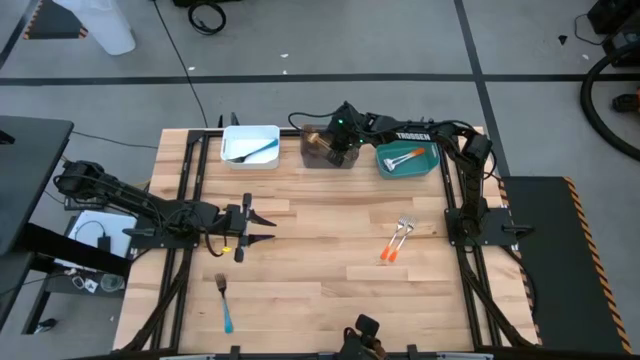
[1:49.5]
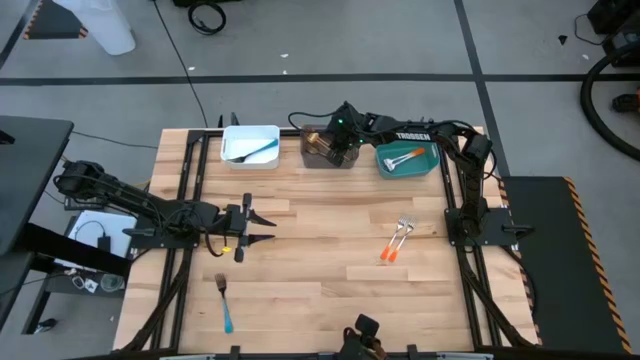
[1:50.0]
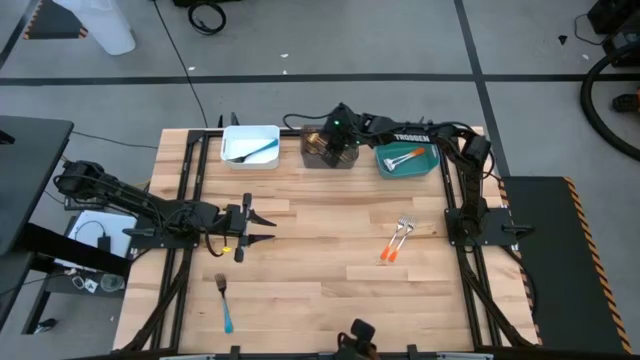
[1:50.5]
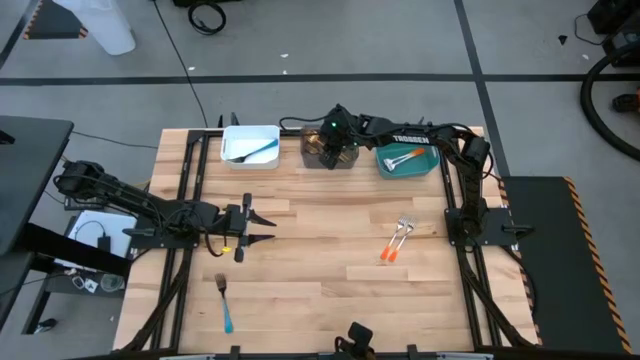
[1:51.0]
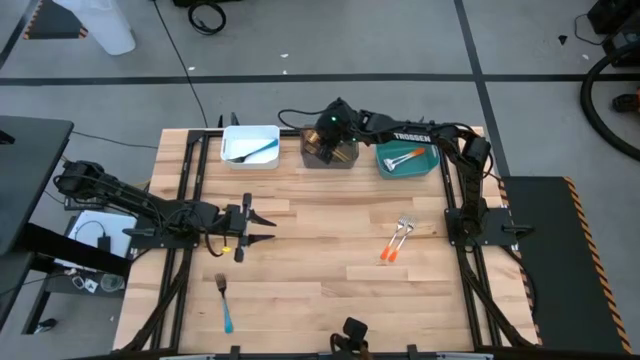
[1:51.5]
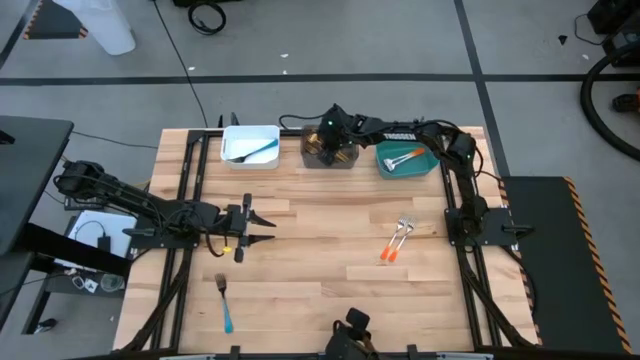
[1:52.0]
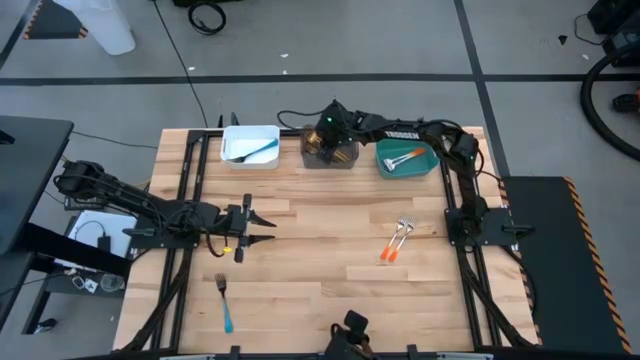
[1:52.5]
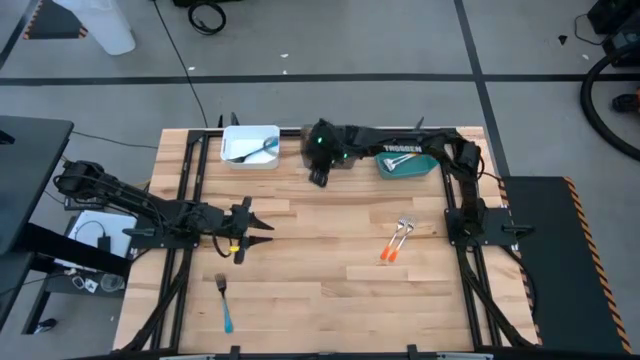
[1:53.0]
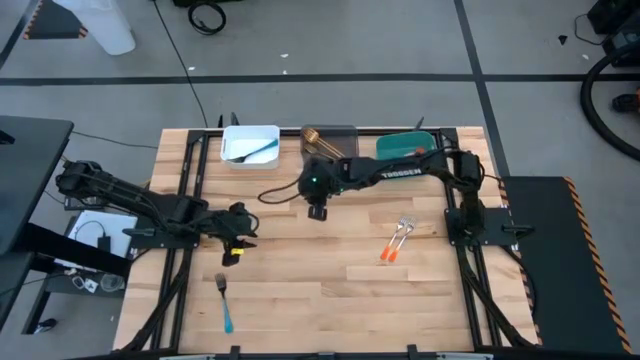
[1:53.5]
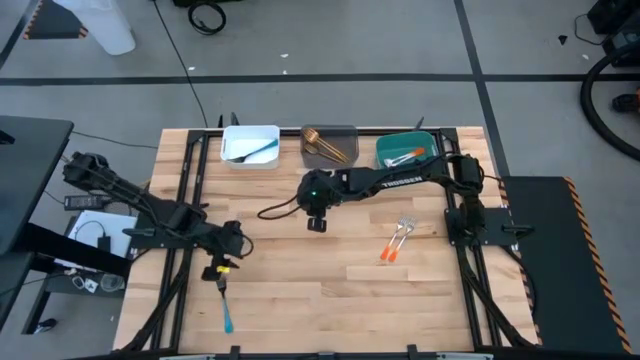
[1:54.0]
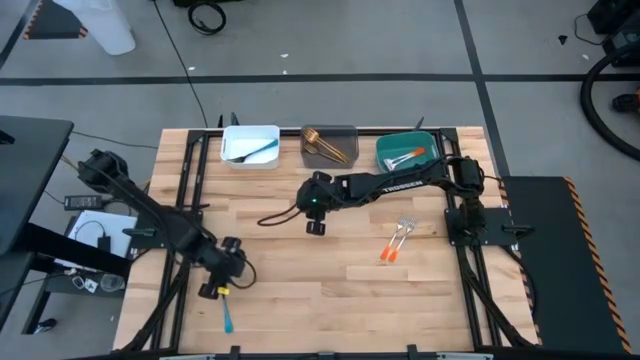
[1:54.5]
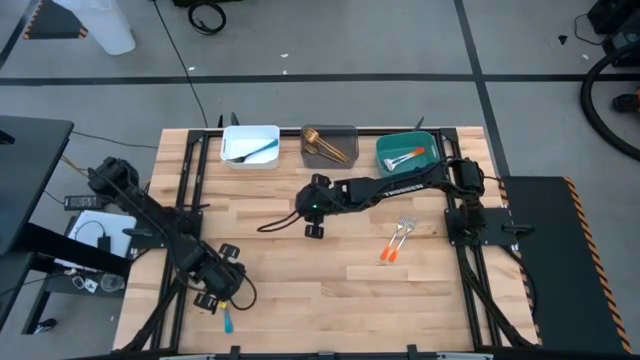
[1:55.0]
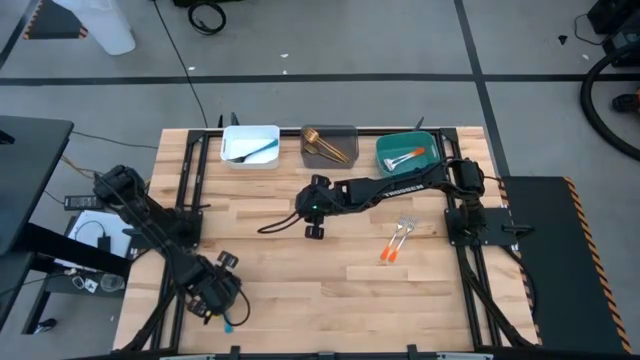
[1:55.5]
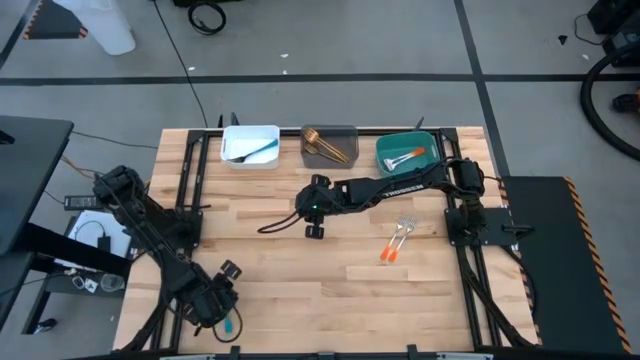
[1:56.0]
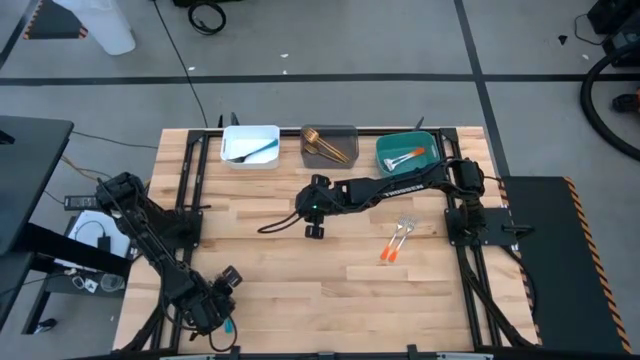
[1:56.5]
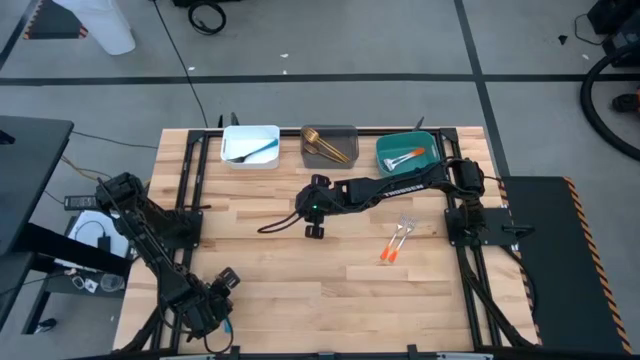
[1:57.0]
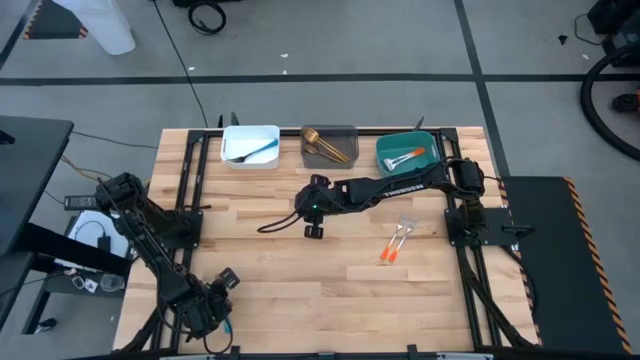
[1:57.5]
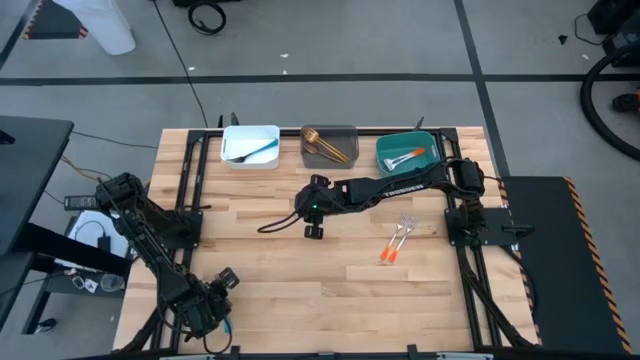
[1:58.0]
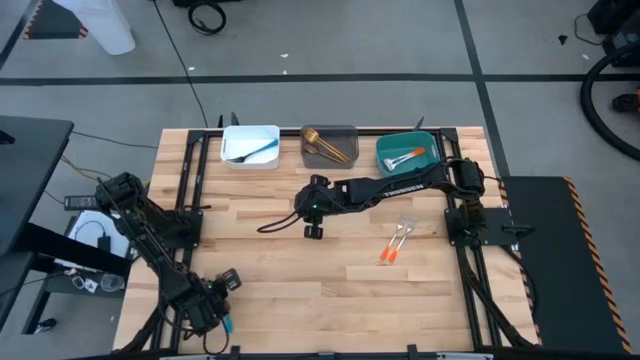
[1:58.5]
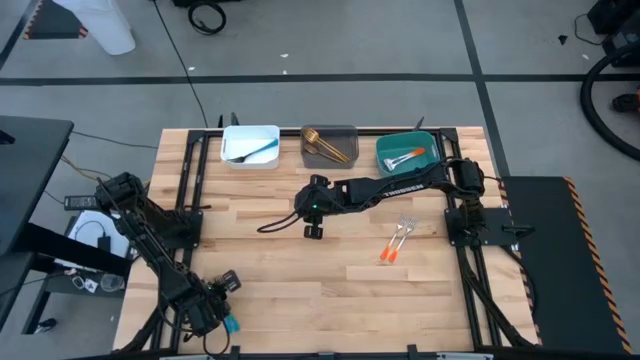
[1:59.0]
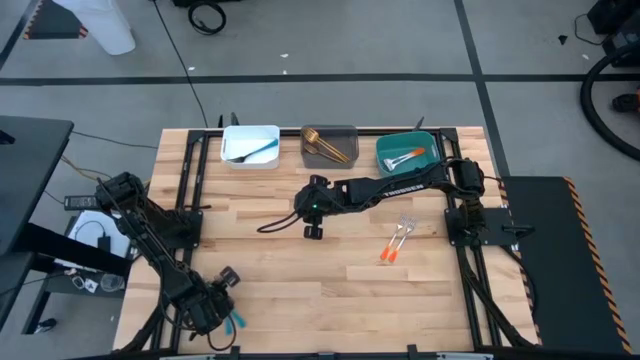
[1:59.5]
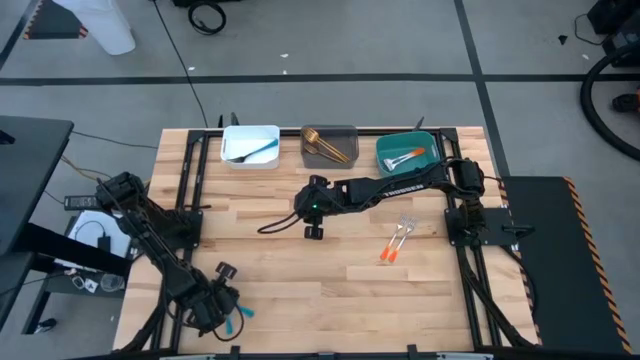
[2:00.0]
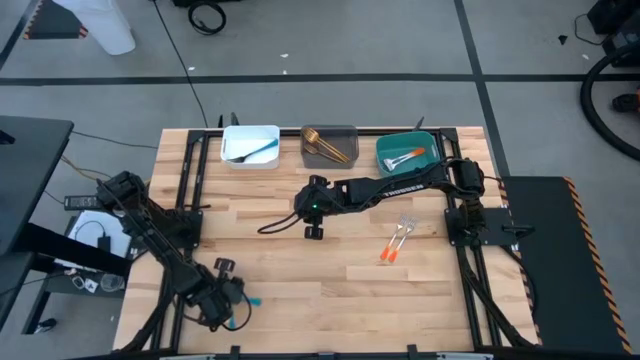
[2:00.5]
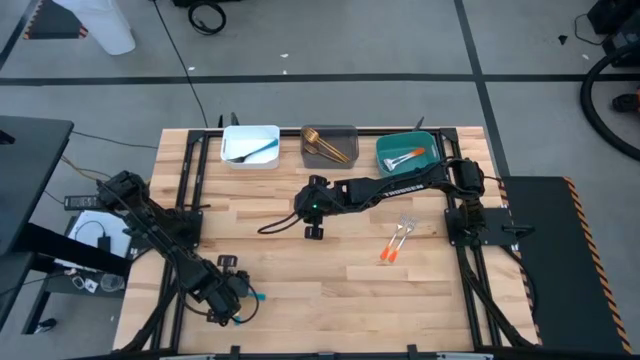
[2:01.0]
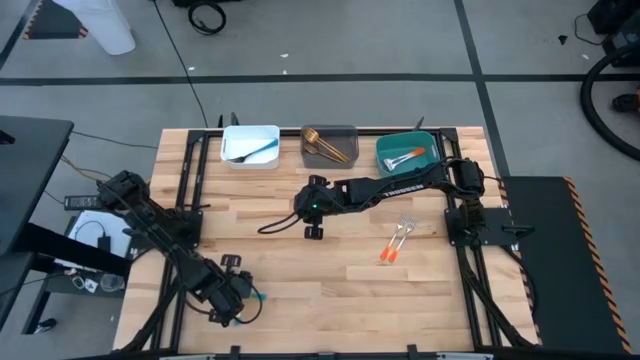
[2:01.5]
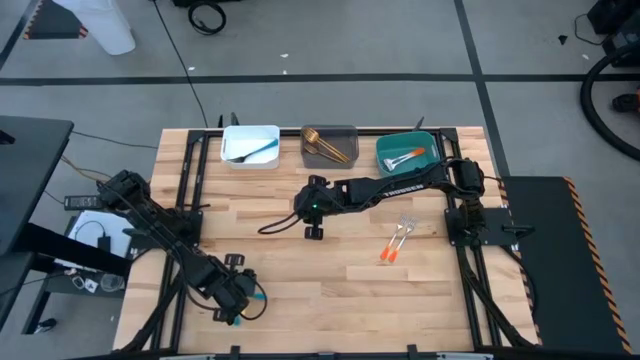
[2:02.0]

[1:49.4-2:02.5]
Task: Sort silverware by color (type)
Put the top blue fork into the white bin

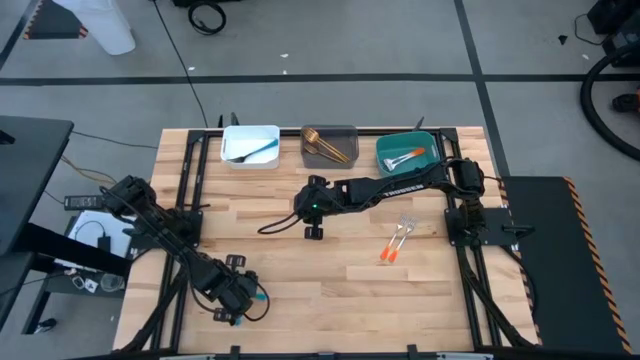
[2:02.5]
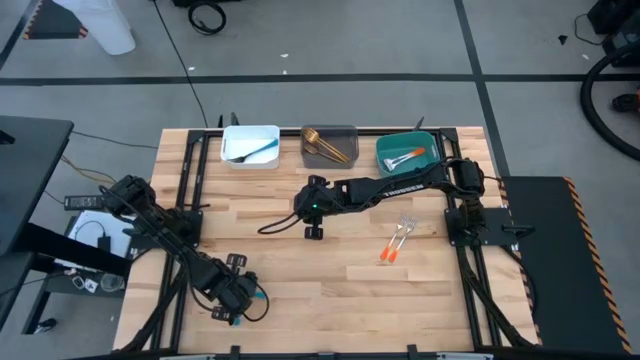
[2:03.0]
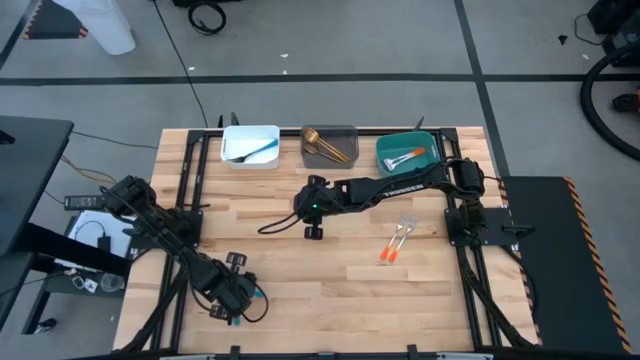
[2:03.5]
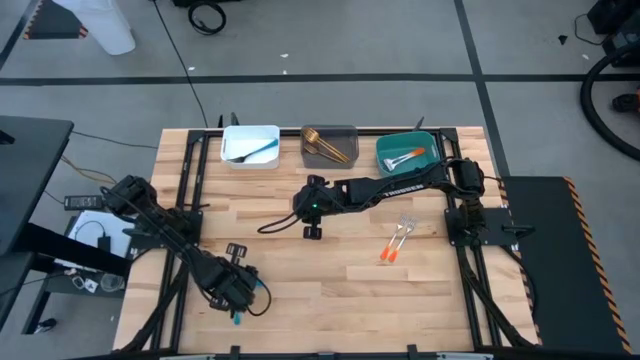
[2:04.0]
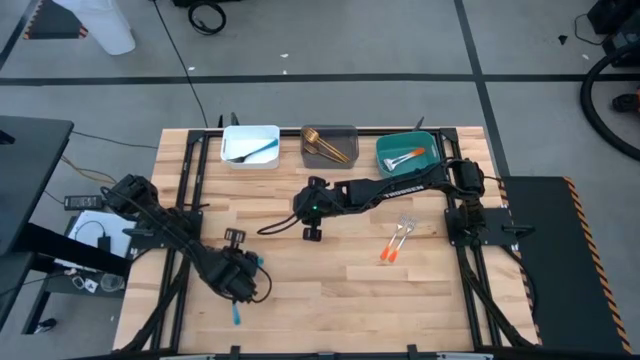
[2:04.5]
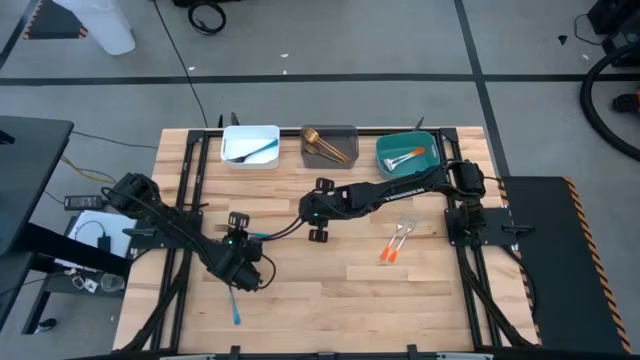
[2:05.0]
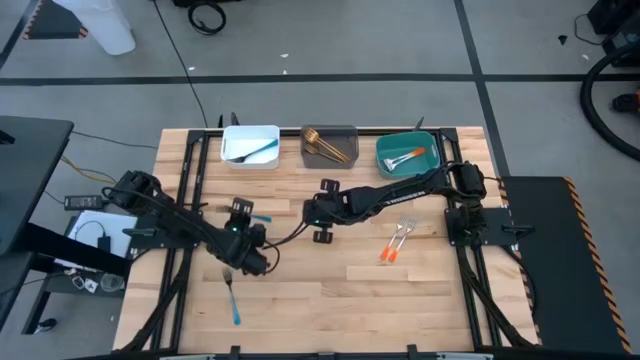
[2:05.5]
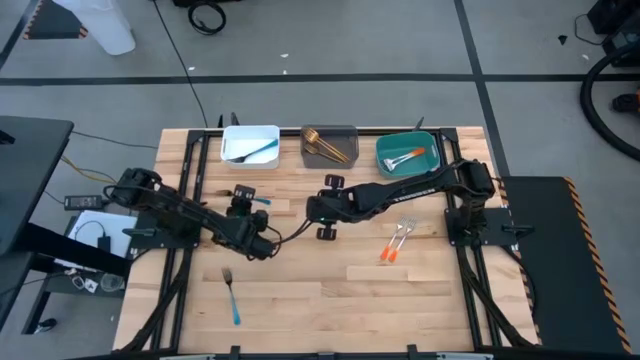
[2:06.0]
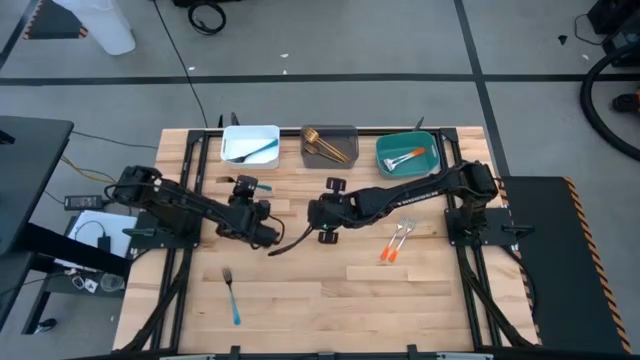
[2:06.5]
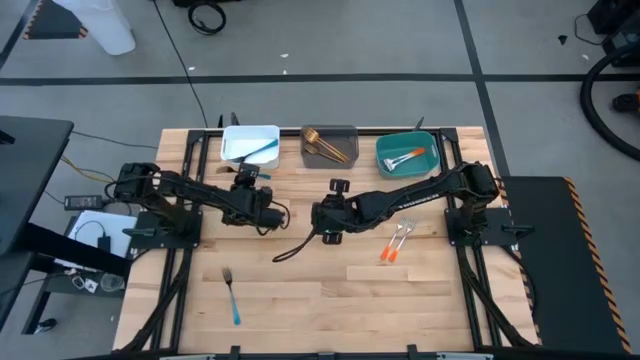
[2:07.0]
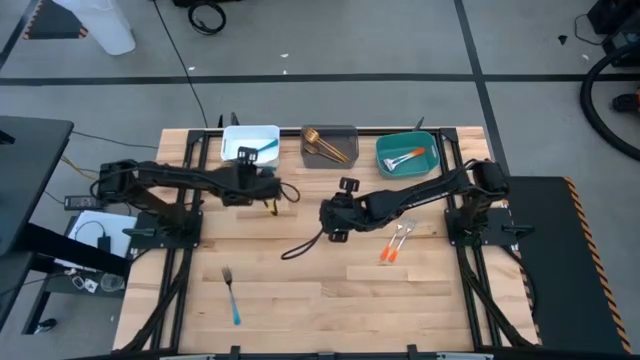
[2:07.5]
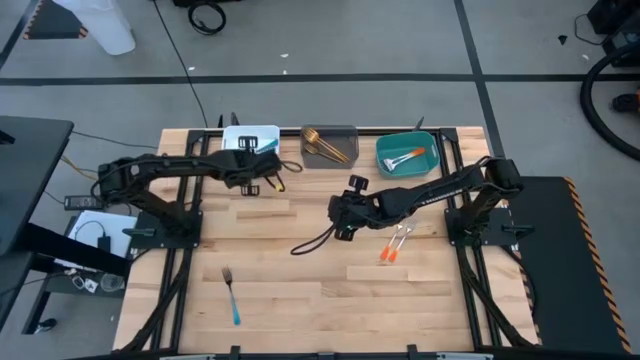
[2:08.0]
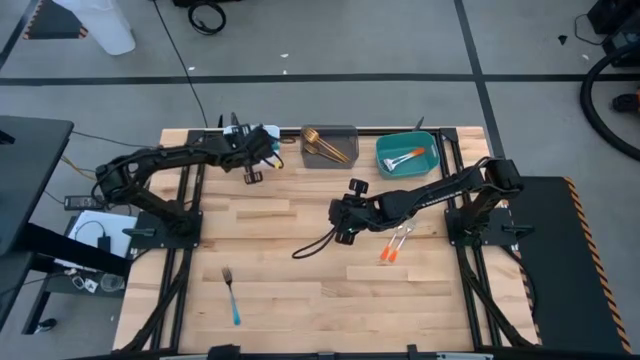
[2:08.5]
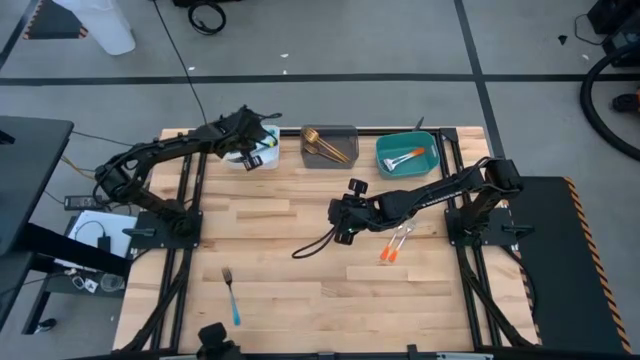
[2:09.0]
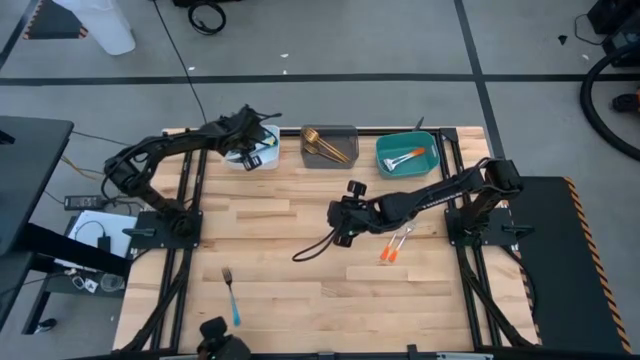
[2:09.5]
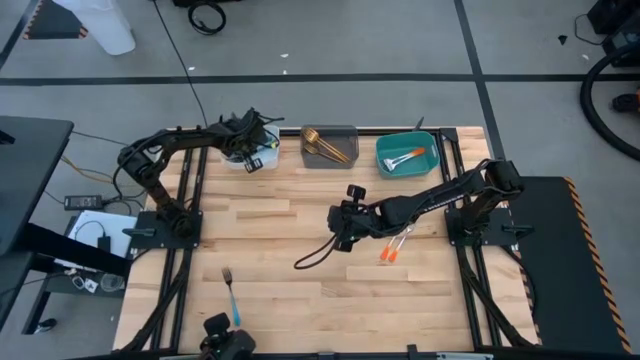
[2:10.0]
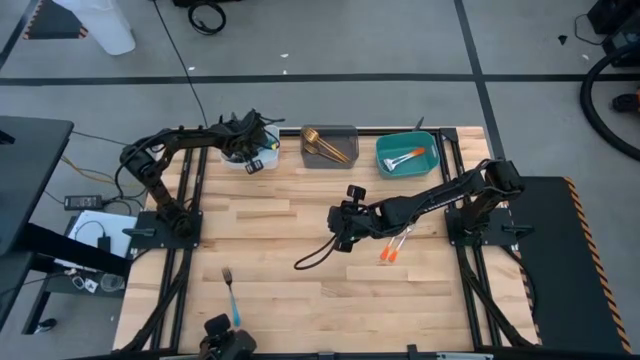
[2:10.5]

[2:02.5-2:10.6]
Put the top blue fork into the white bin

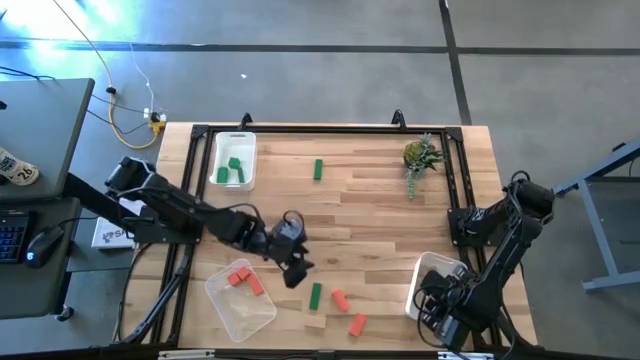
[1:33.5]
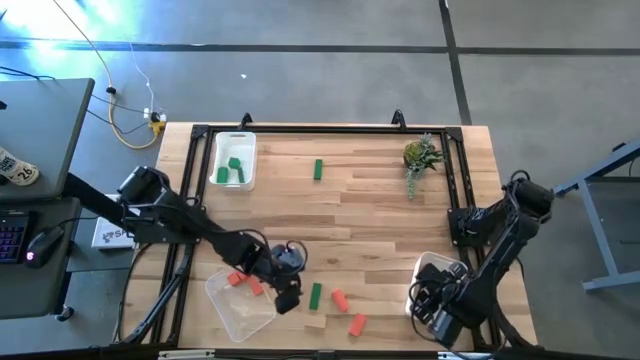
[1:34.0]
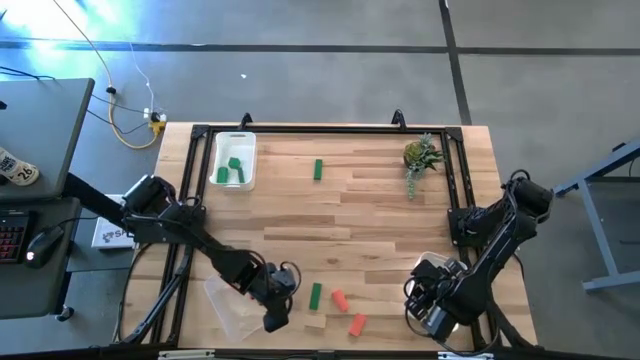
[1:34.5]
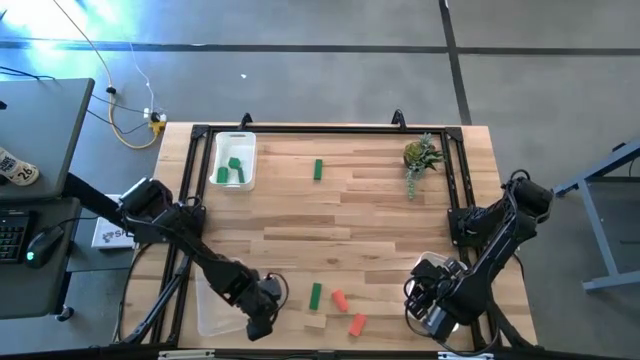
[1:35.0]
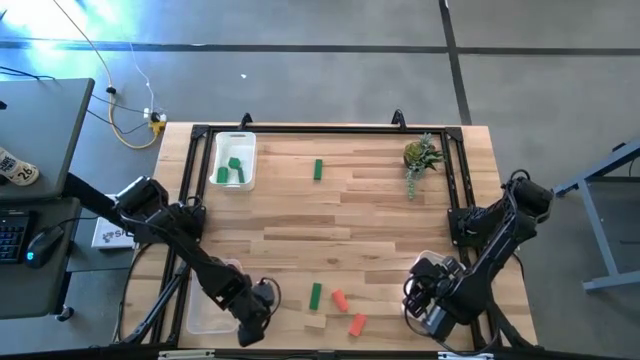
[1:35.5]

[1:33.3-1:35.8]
Task: Sort & place blocks by color
Adjust the transparent bin on the table
